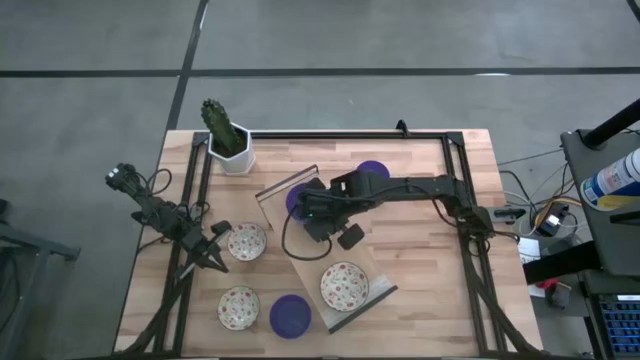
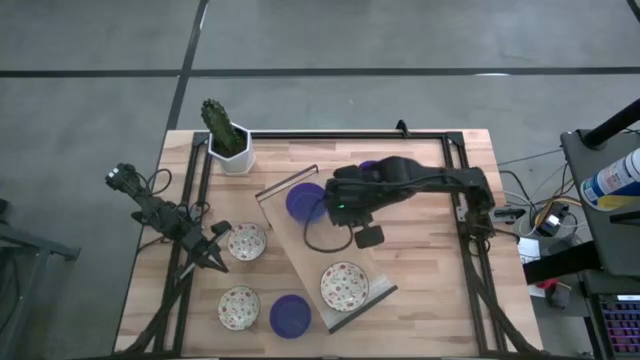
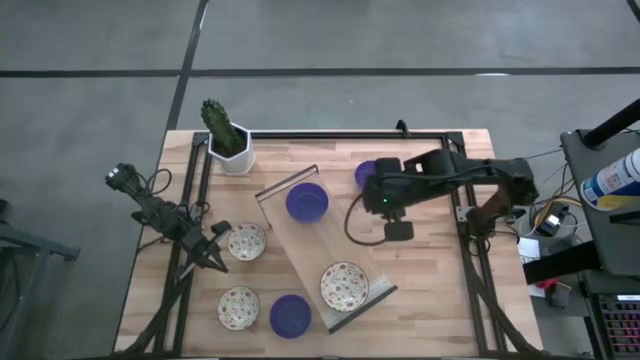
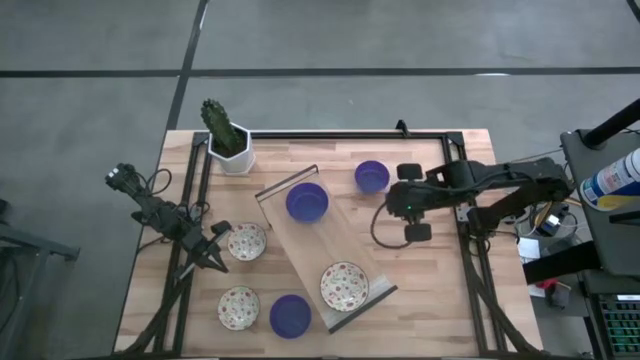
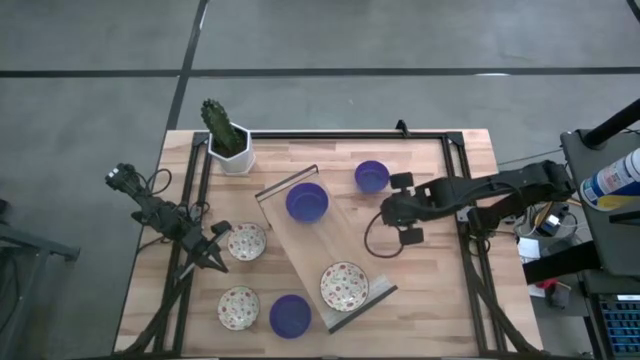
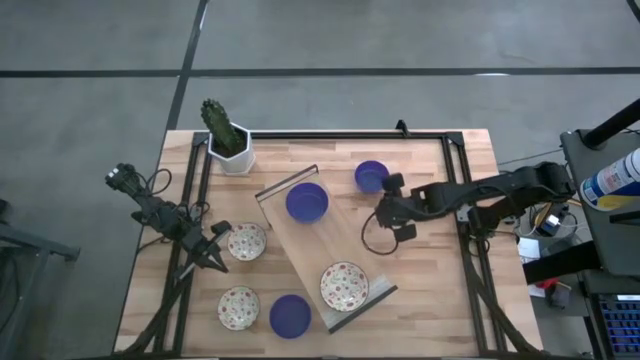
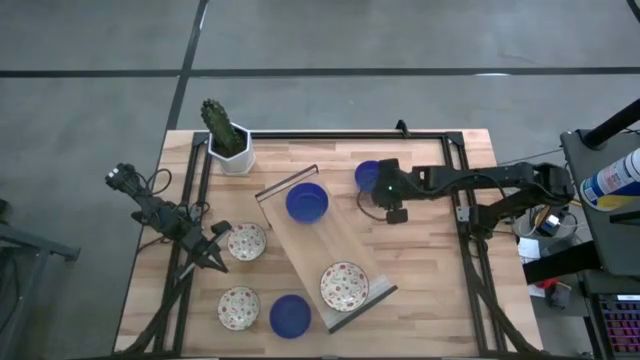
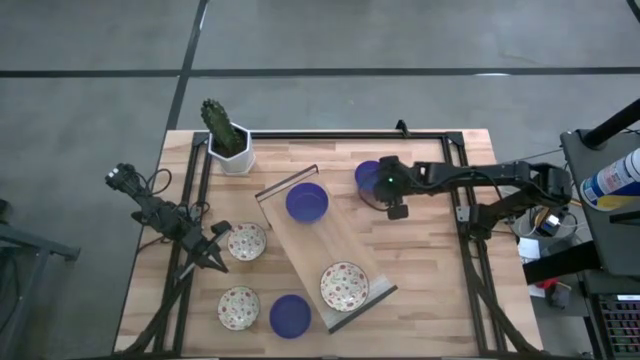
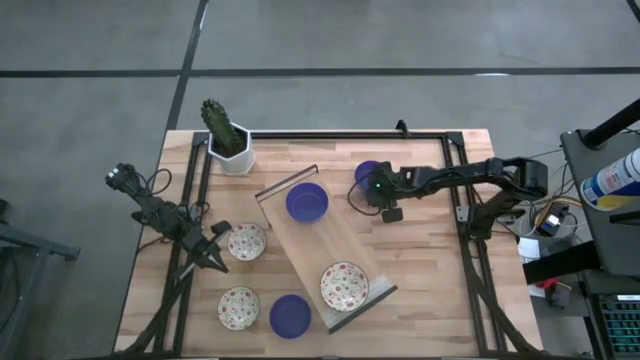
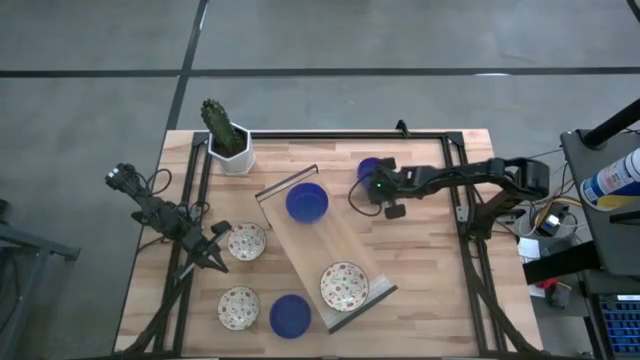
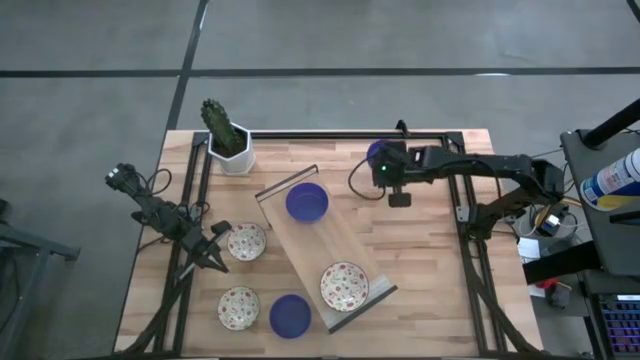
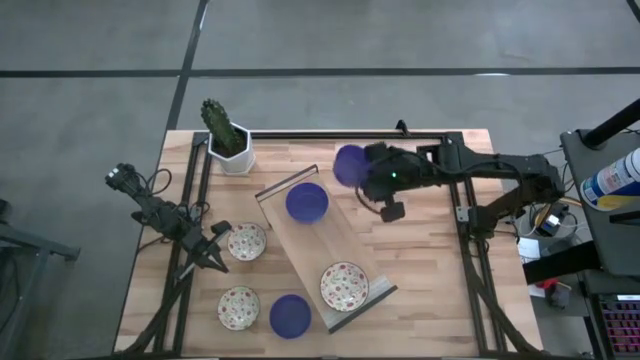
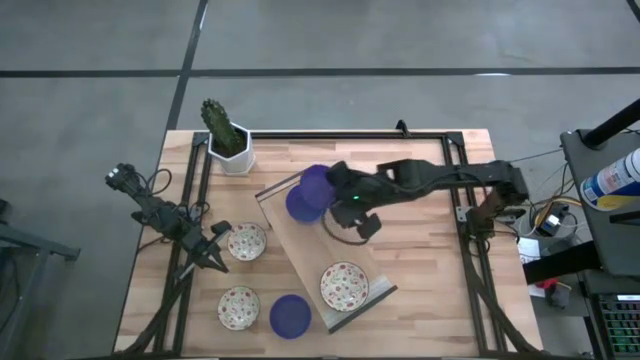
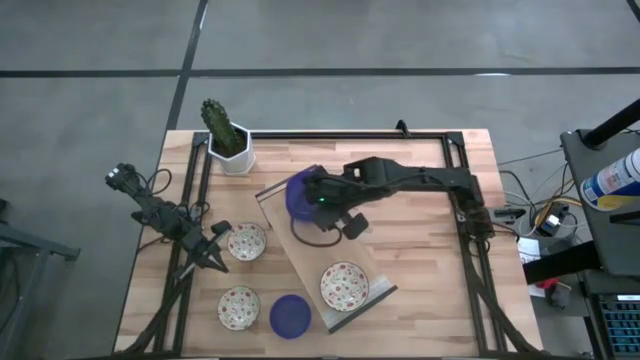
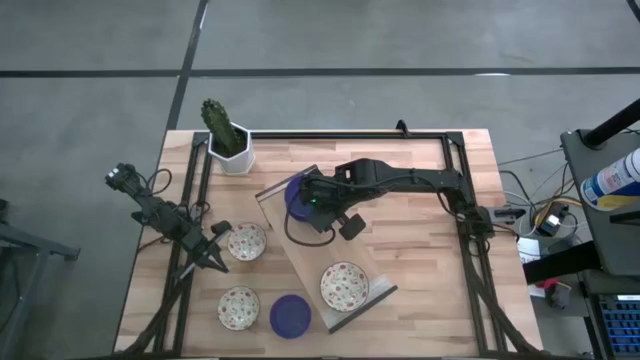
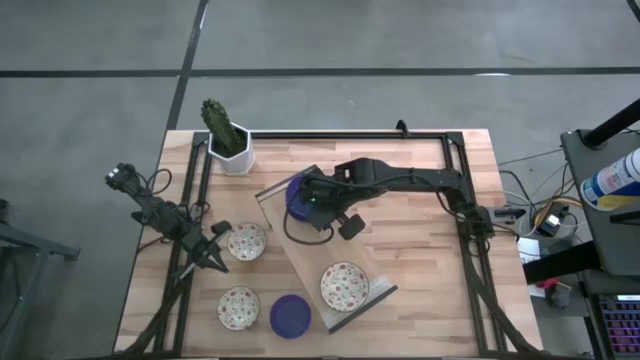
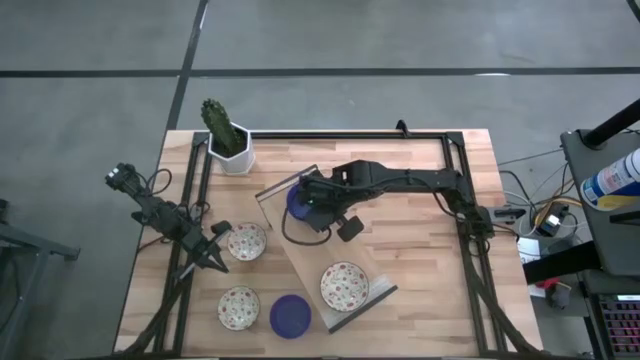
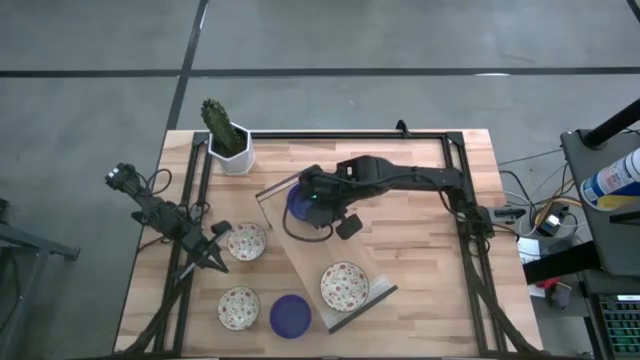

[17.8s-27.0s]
Task: Pick & Place Mini bowls
Stack the top violet bowl on the violet bowl on the shelf

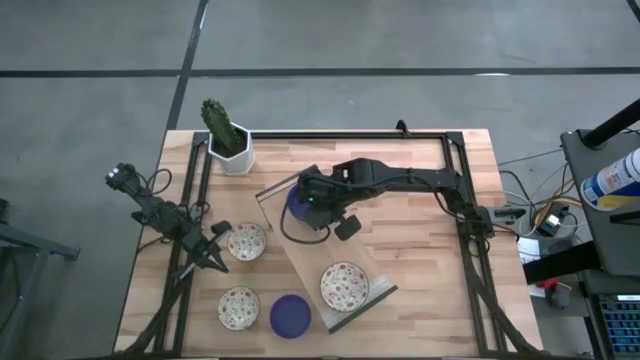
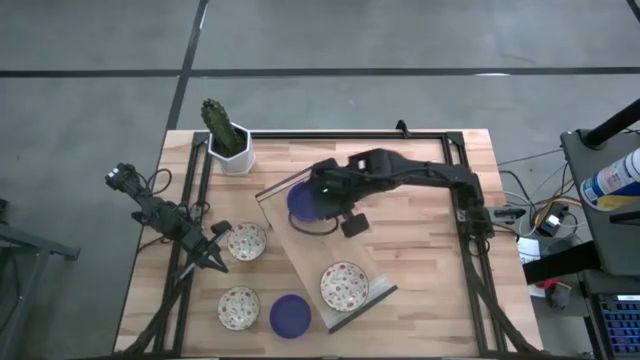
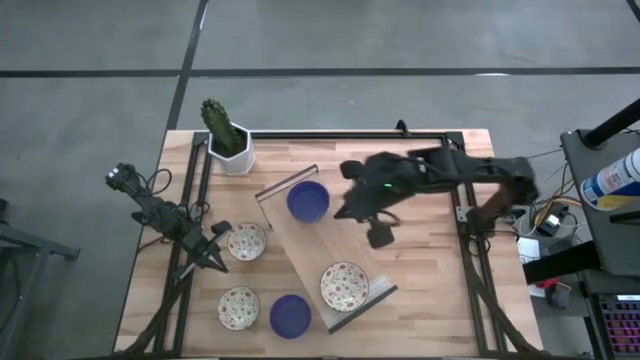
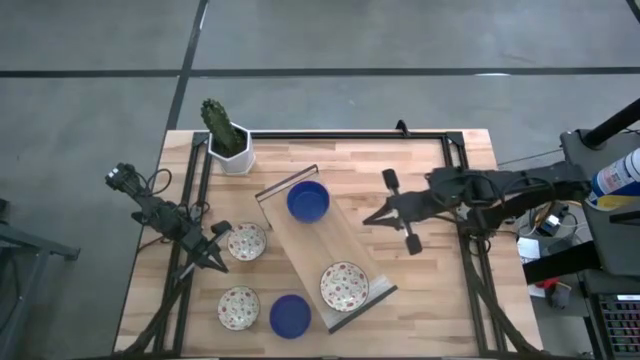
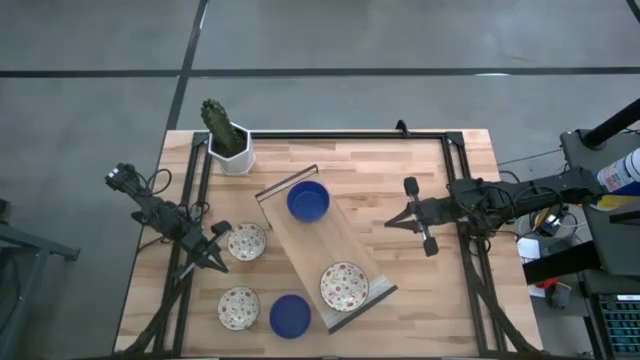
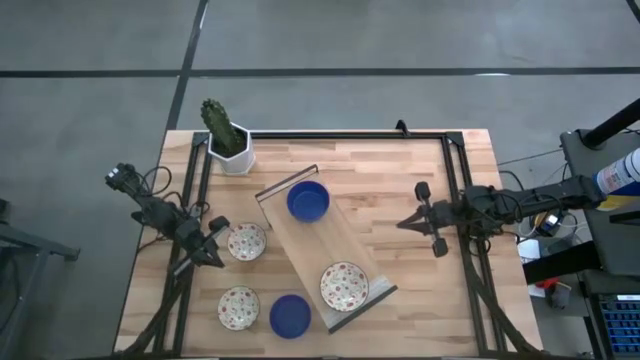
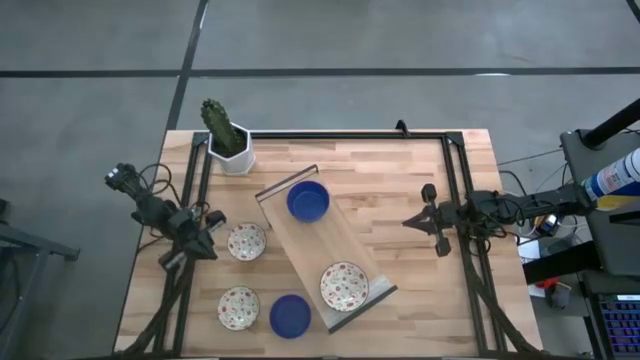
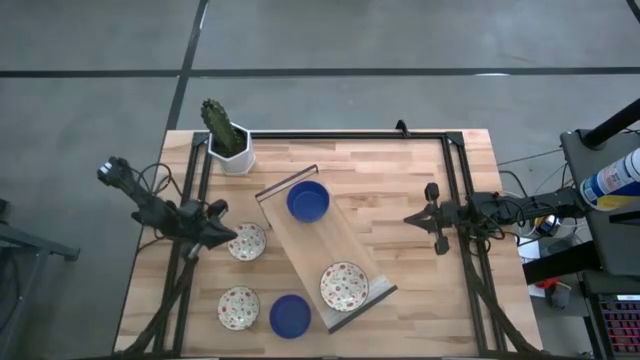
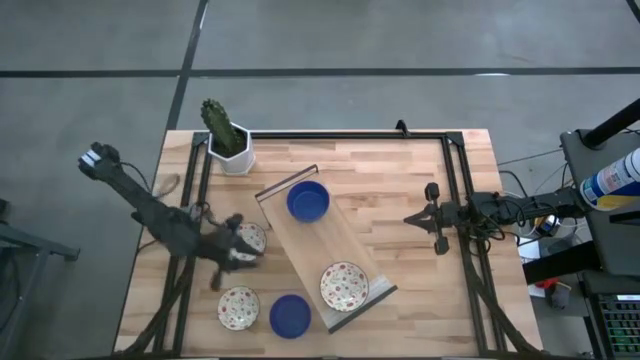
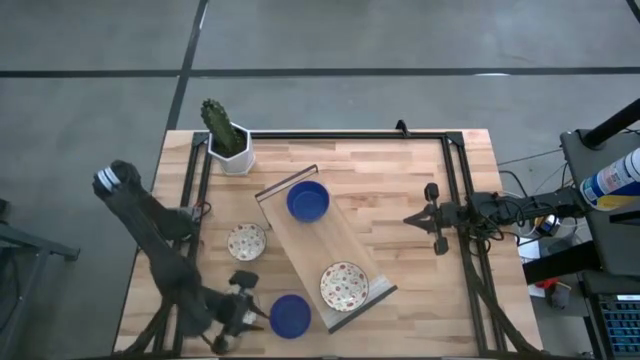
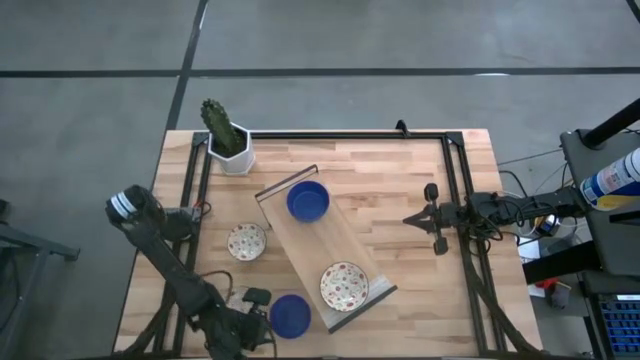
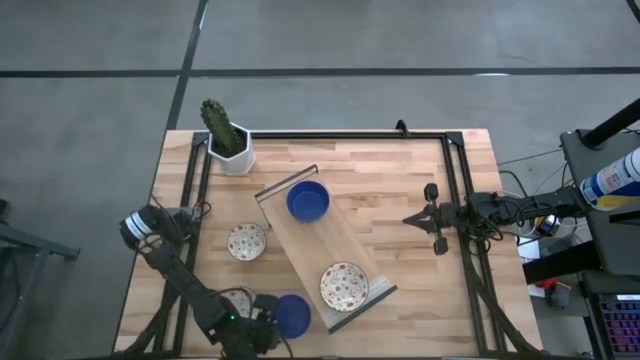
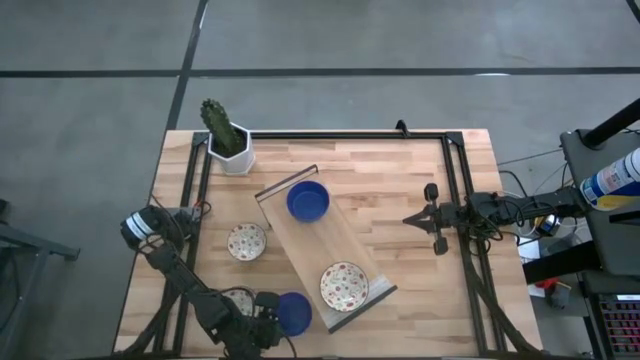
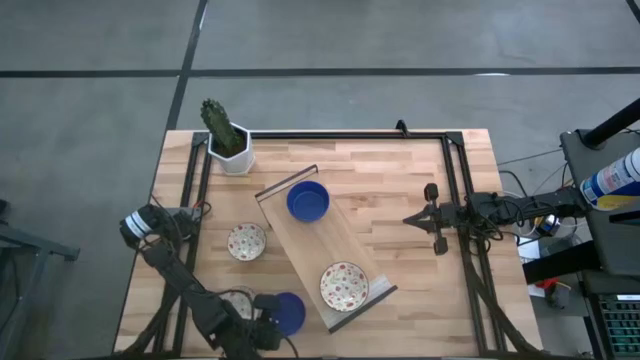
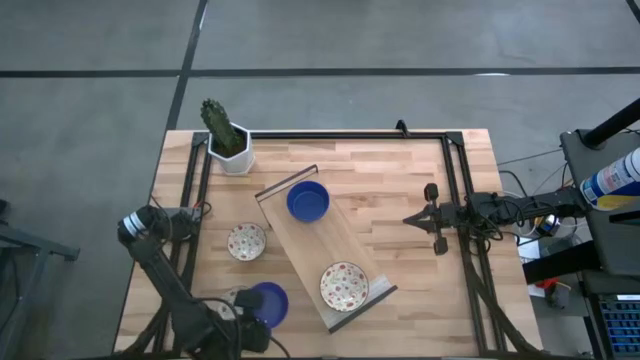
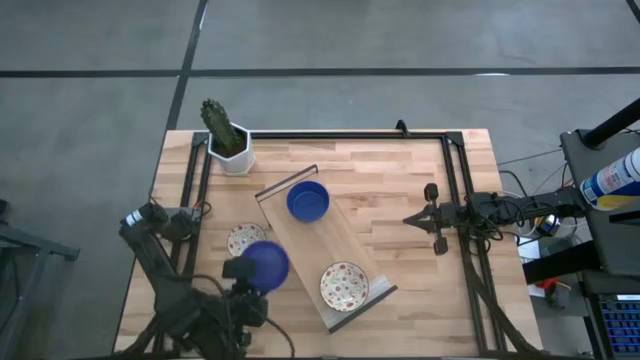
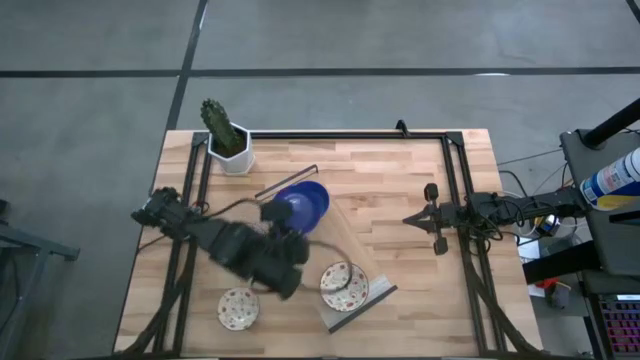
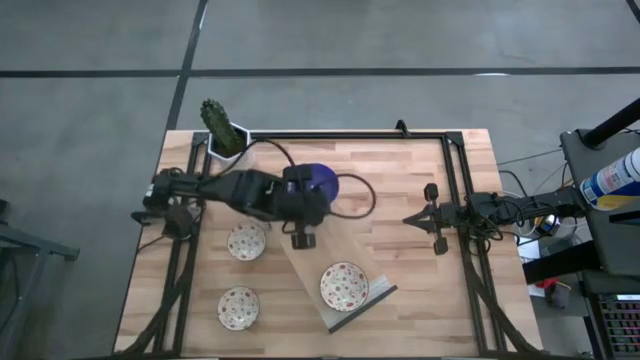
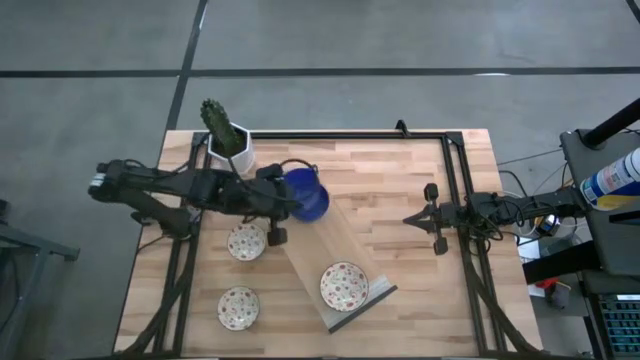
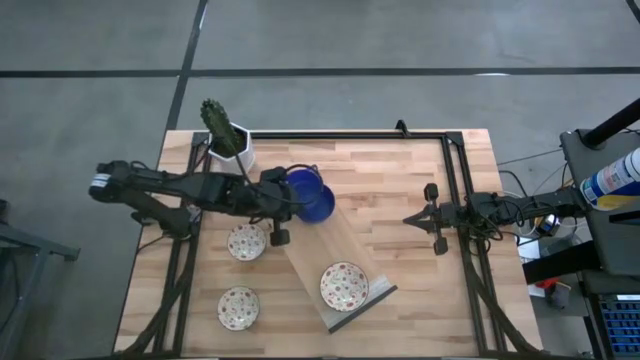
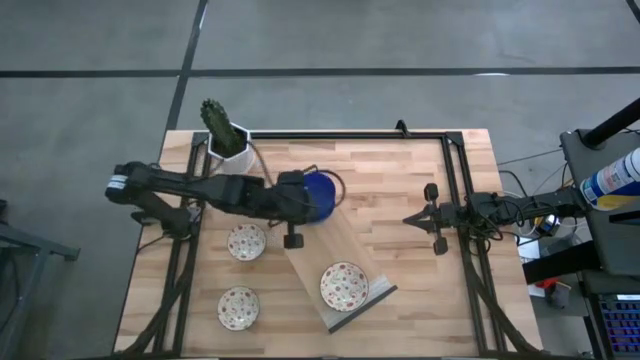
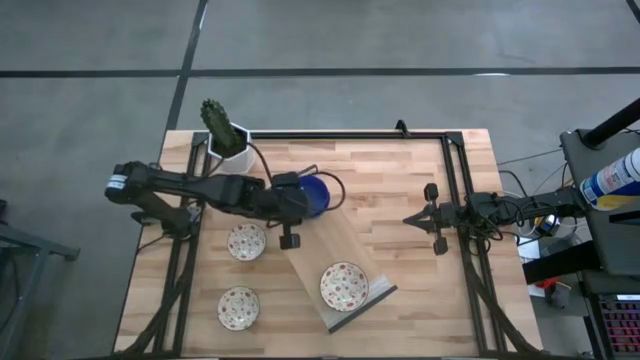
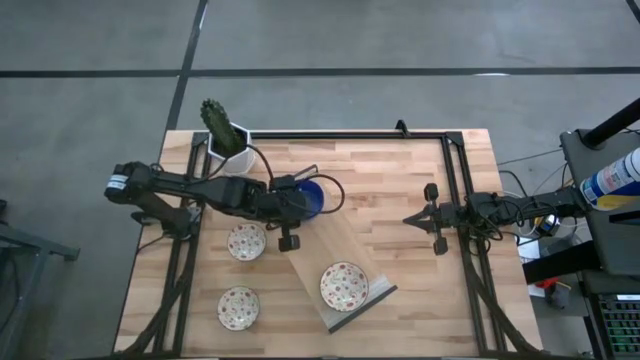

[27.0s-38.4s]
Stack the violet bowl on the violet bowls on the shelf

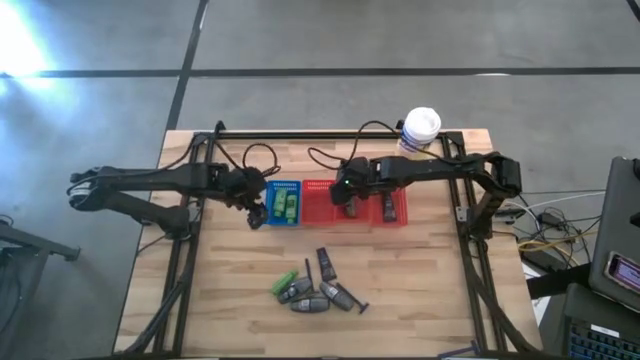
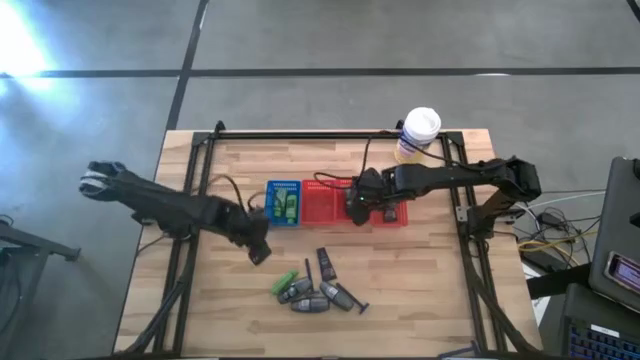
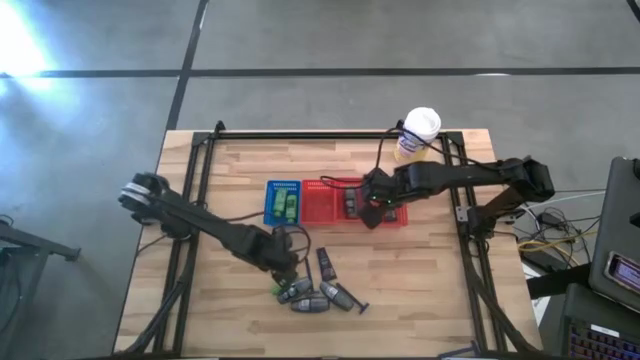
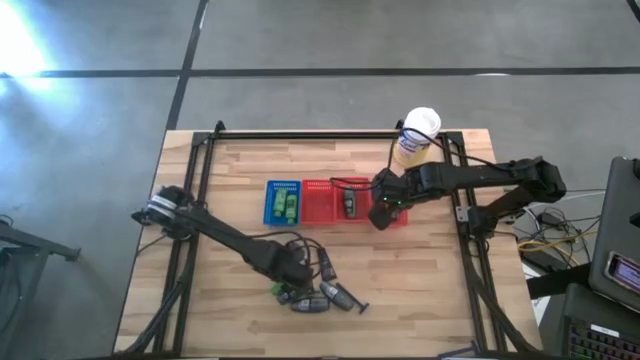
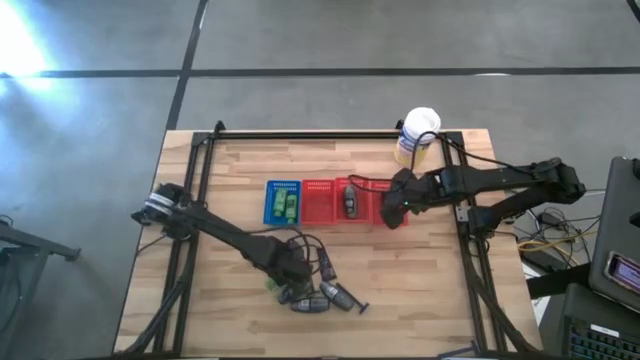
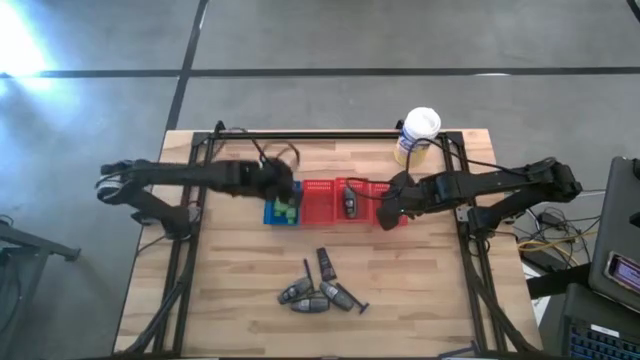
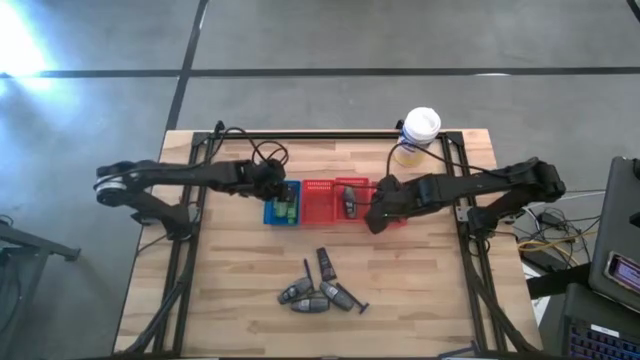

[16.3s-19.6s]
Task: Pick & Place Travel size toiletries
Put the green shampoo into the blue bin
